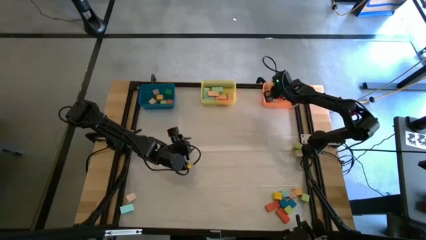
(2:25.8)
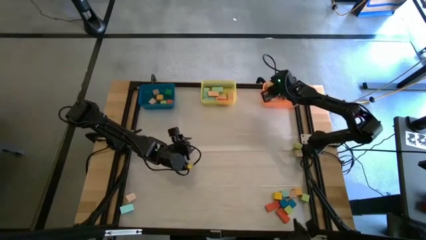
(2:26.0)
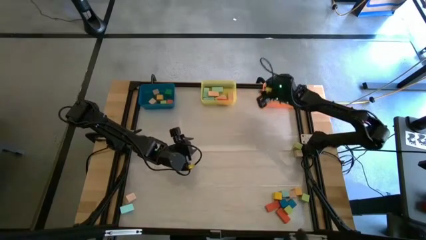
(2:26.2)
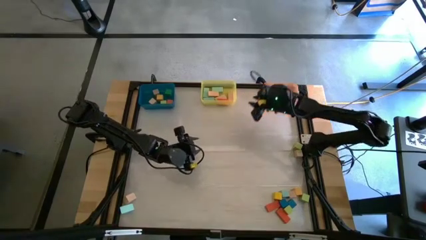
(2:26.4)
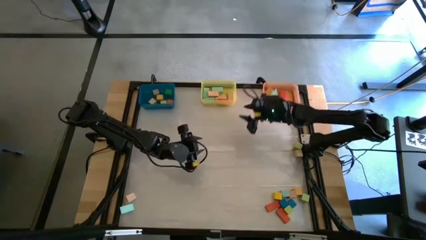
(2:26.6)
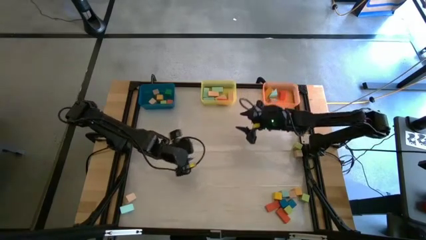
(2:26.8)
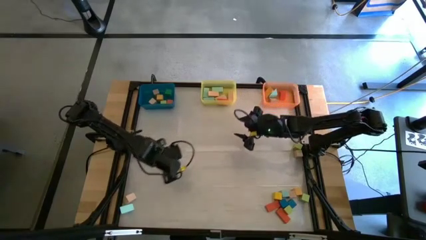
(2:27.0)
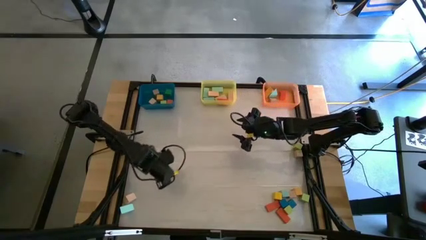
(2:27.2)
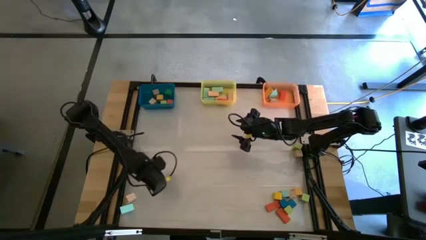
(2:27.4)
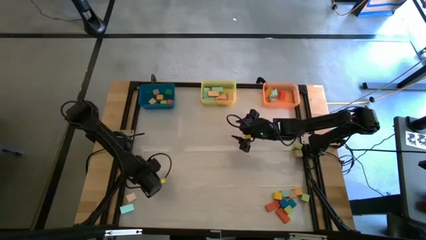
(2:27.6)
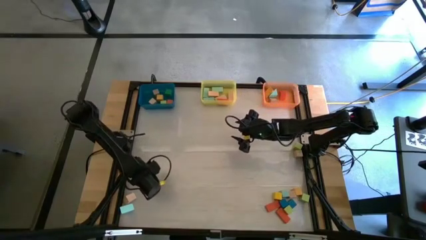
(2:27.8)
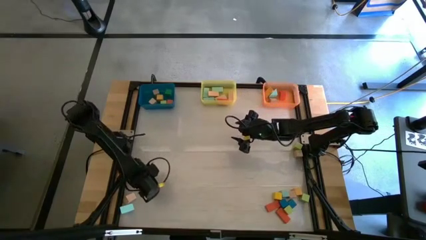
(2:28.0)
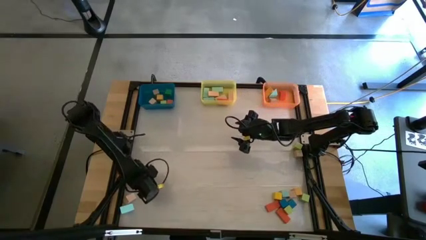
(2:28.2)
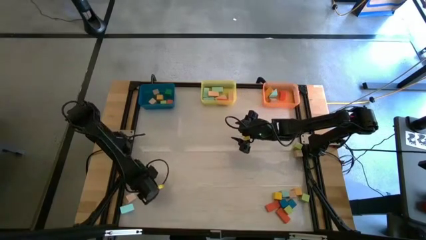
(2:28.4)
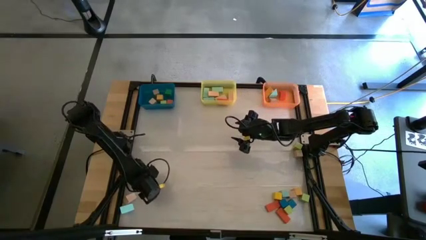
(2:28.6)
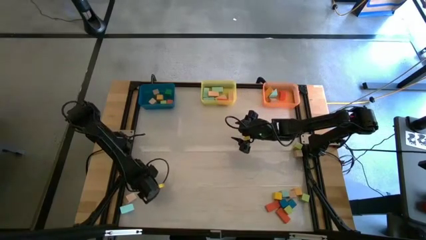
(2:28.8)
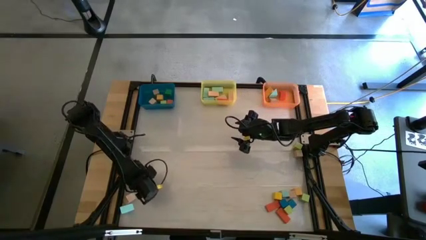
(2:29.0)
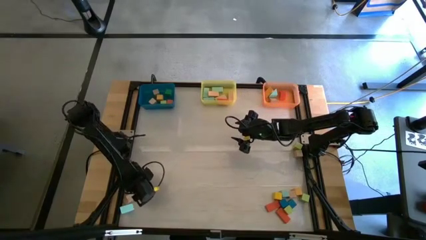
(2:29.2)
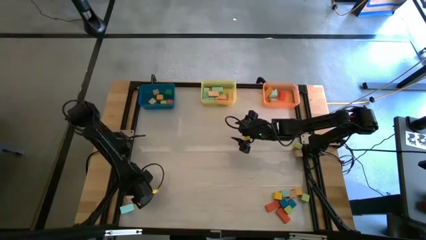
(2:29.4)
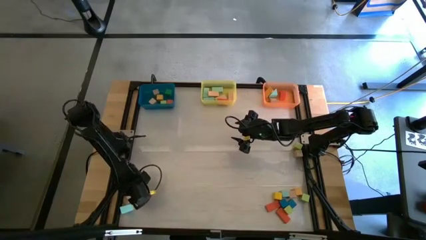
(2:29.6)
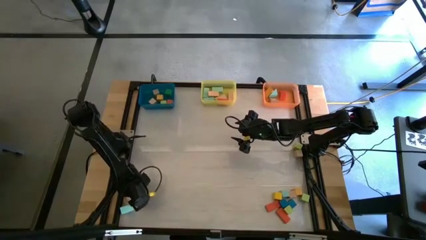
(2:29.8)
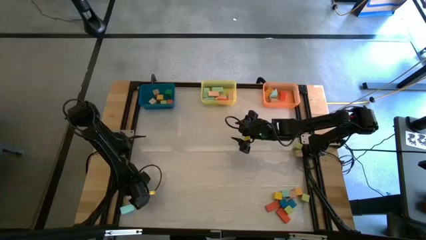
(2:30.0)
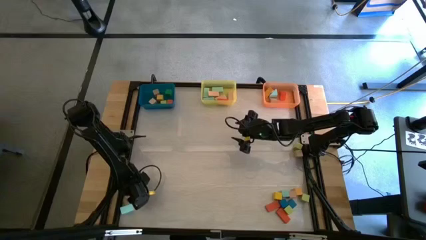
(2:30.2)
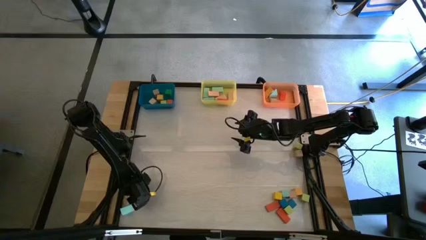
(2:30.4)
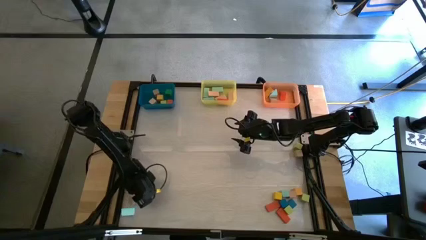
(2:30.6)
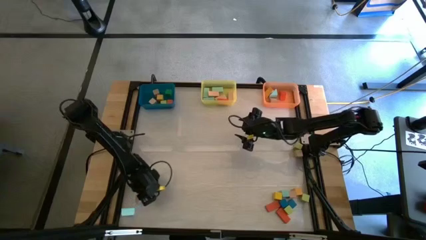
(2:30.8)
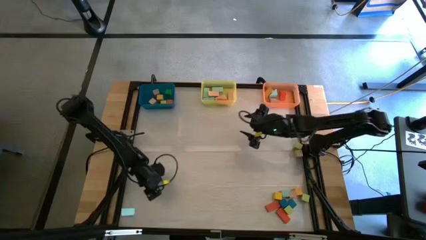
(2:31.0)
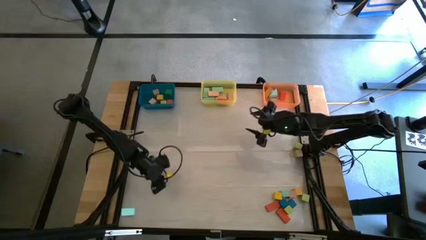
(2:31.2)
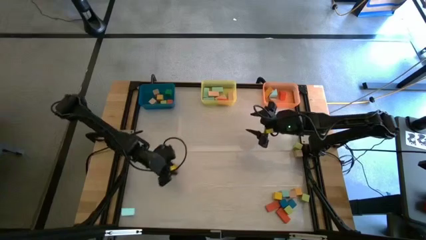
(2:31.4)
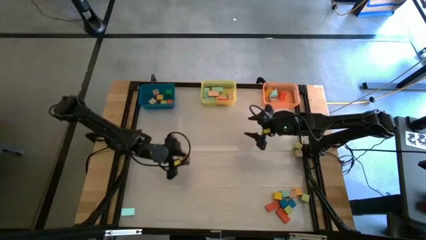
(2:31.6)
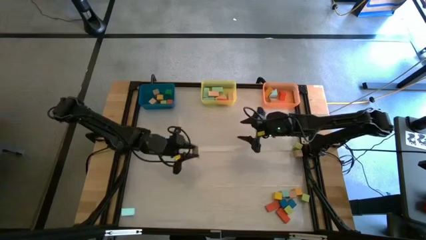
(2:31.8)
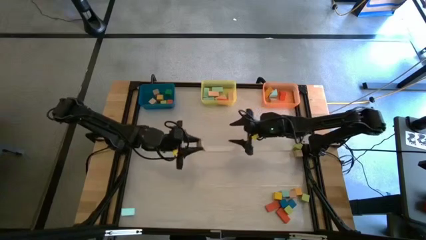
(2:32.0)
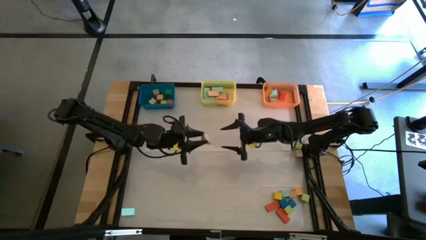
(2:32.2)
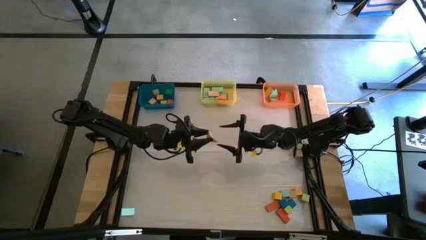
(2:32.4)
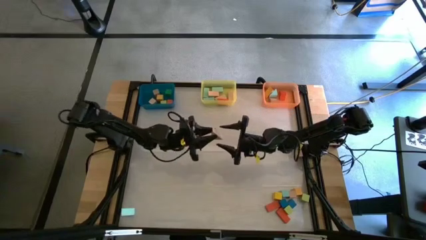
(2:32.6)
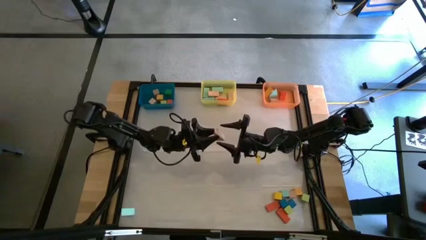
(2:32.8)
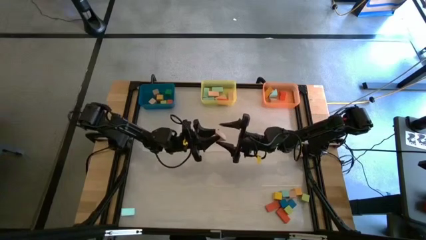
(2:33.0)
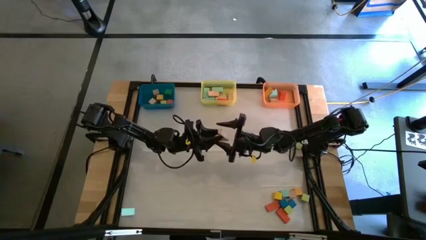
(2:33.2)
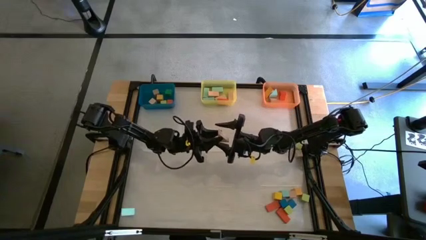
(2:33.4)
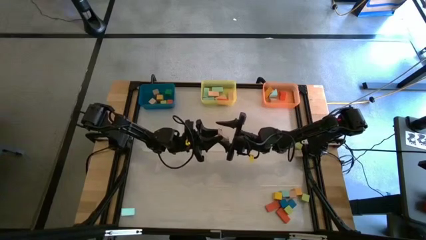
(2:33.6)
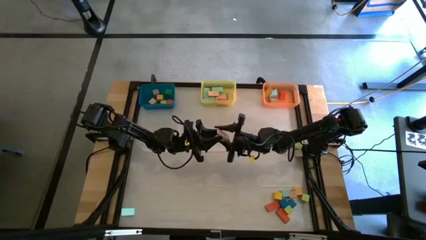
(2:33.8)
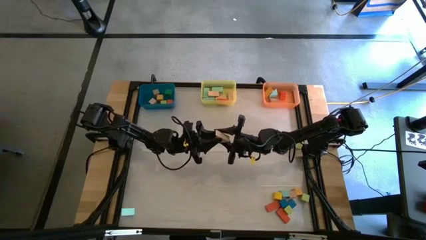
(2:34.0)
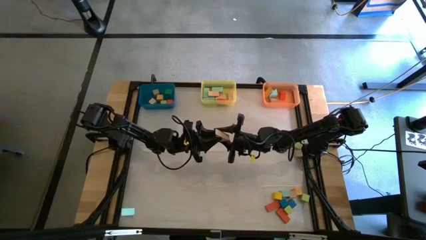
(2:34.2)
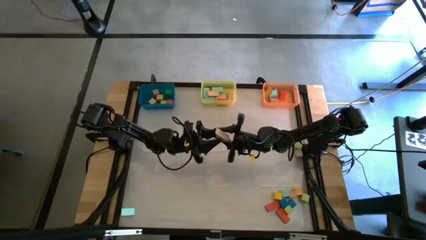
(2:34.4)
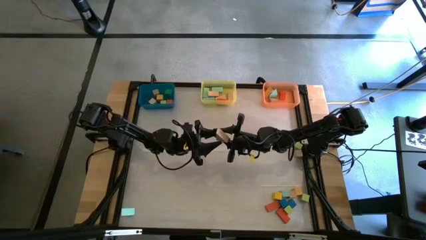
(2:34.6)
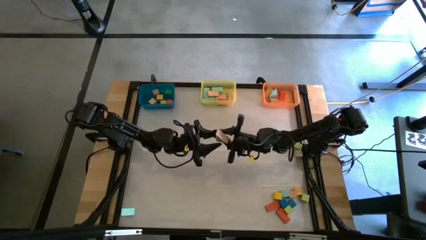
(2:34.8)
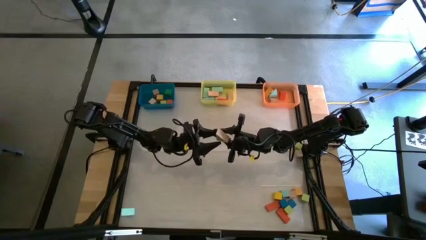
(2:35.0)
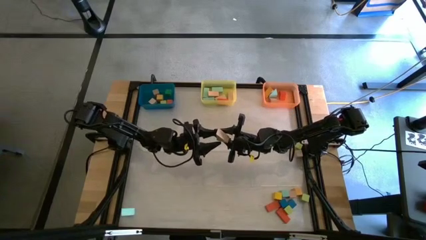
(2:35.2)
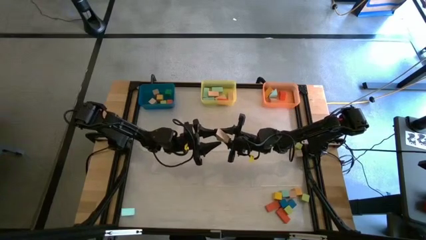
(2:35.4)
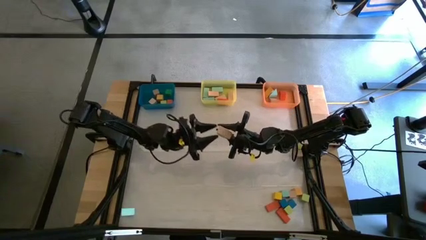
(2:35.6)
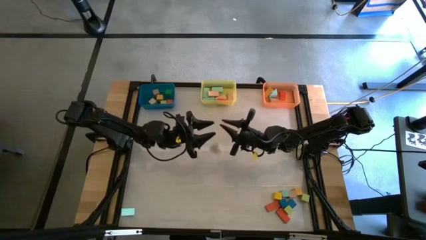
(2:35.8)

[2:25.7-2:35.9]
Task: Sort blocks by size
Put the brown triangle block into the orange bin

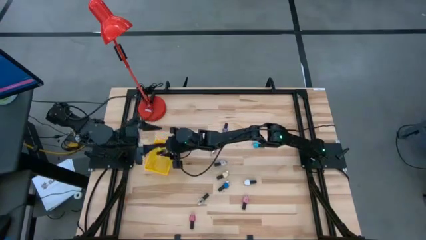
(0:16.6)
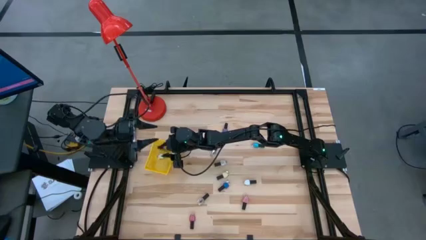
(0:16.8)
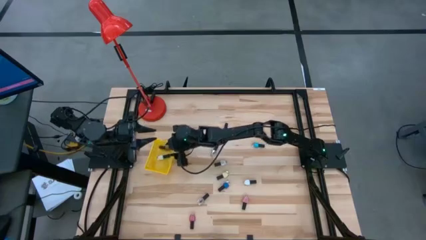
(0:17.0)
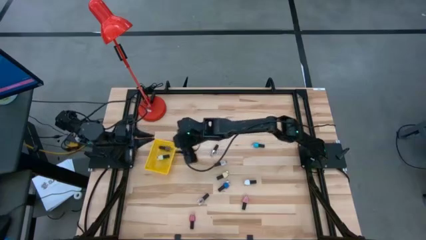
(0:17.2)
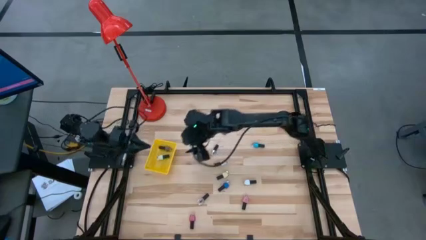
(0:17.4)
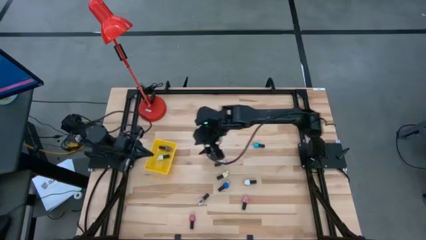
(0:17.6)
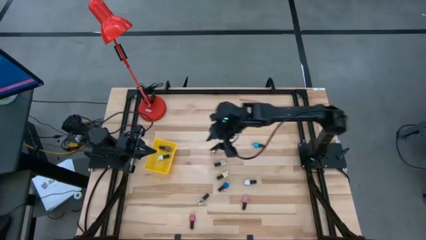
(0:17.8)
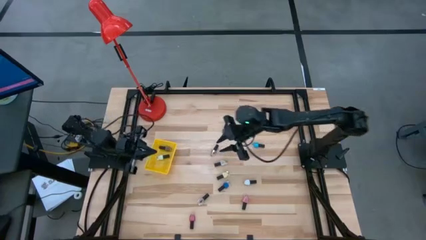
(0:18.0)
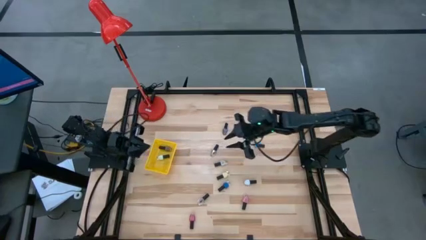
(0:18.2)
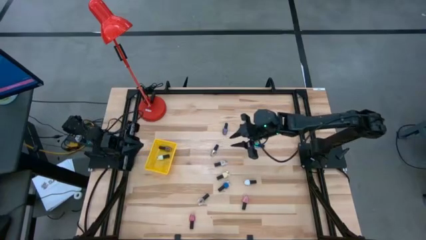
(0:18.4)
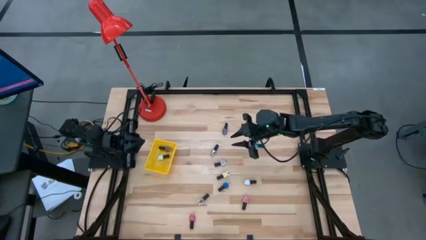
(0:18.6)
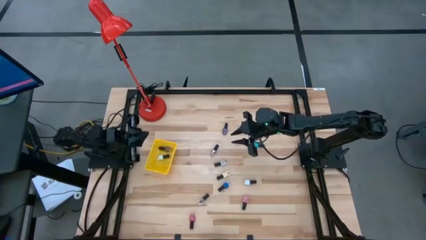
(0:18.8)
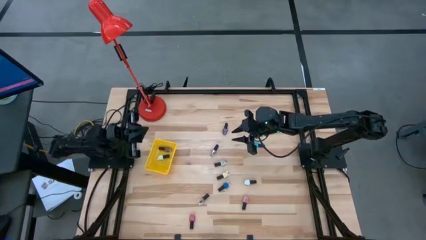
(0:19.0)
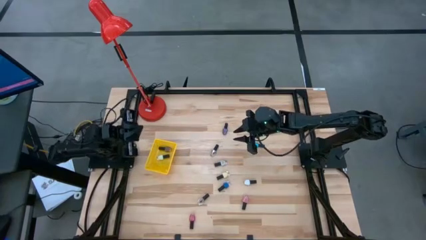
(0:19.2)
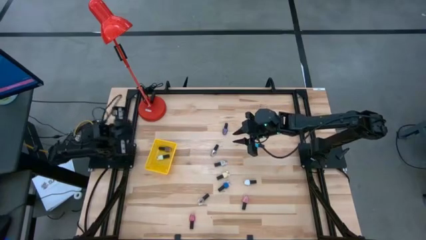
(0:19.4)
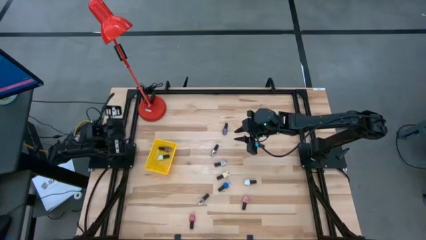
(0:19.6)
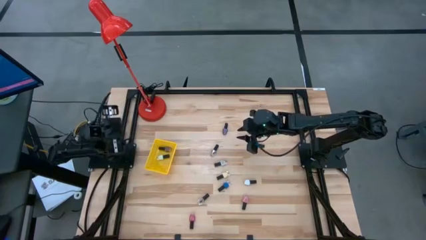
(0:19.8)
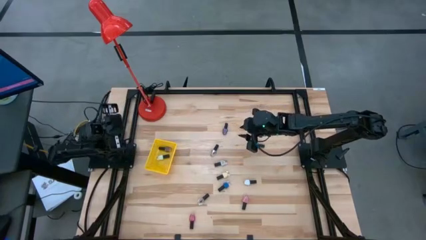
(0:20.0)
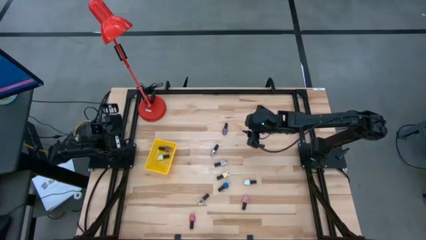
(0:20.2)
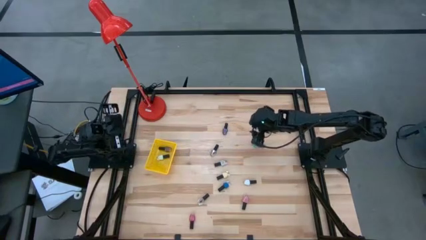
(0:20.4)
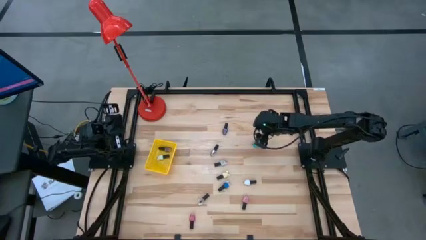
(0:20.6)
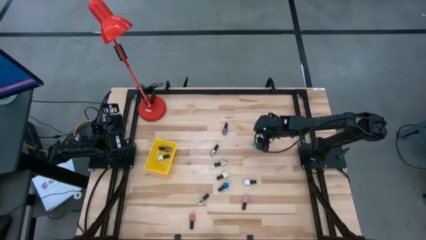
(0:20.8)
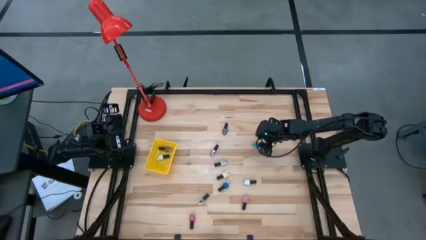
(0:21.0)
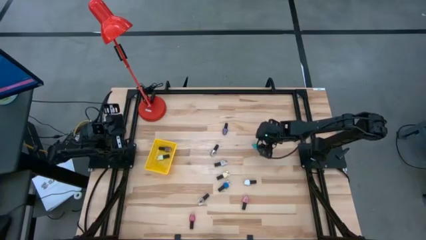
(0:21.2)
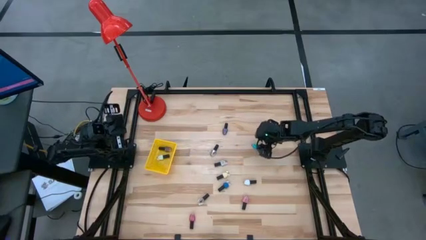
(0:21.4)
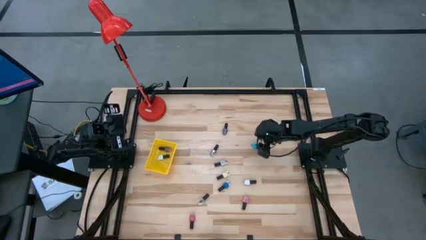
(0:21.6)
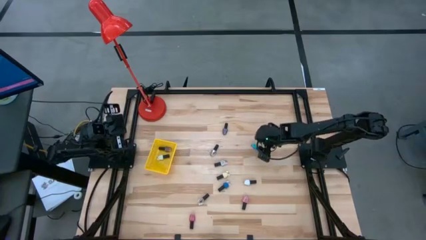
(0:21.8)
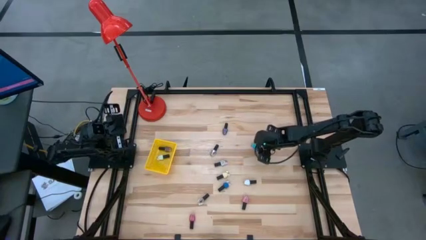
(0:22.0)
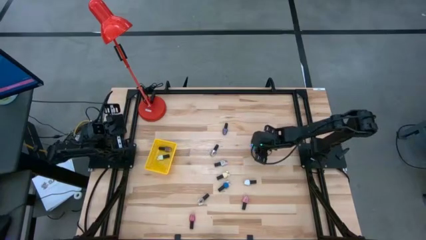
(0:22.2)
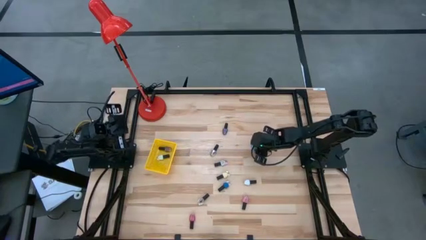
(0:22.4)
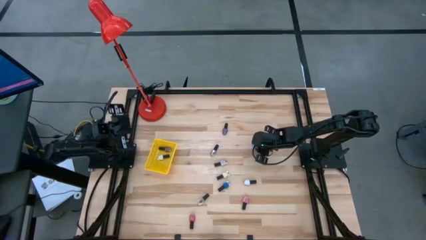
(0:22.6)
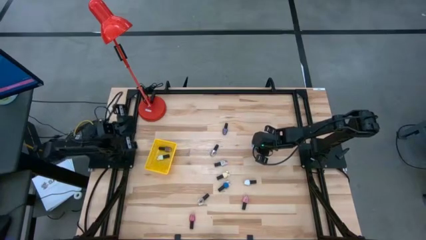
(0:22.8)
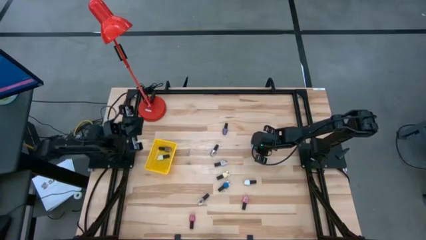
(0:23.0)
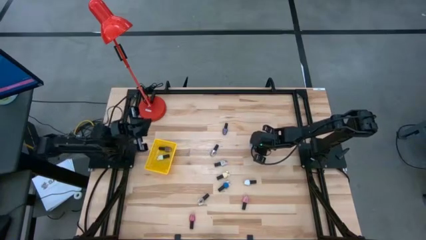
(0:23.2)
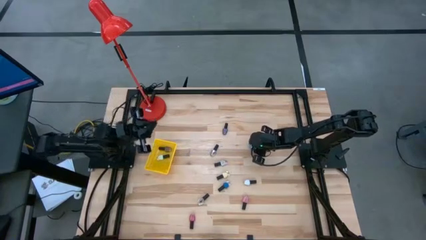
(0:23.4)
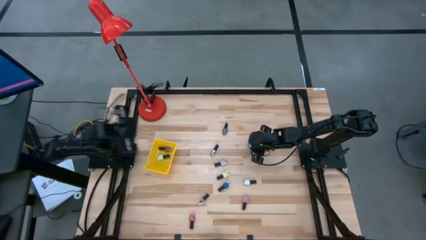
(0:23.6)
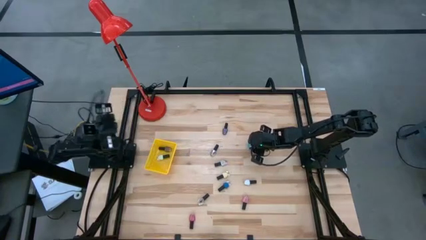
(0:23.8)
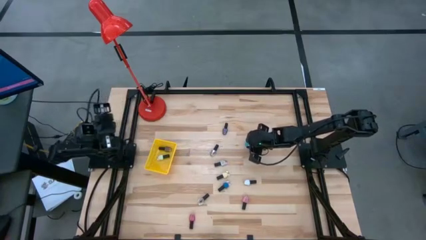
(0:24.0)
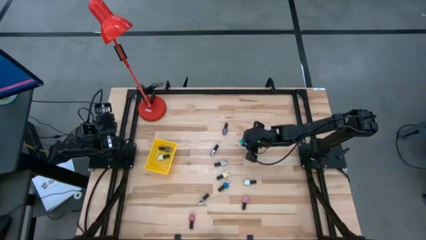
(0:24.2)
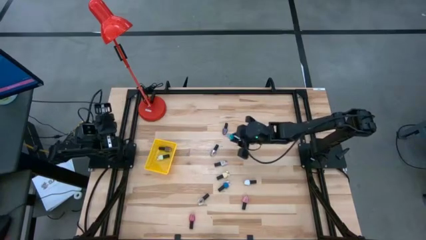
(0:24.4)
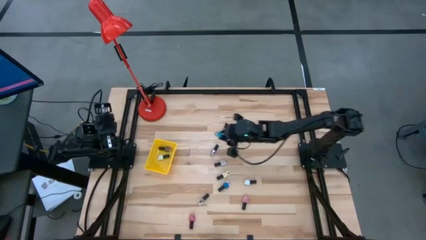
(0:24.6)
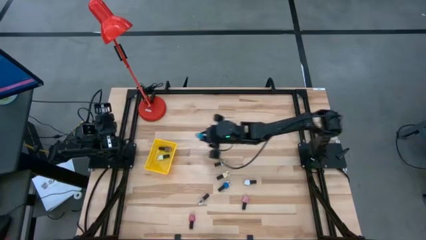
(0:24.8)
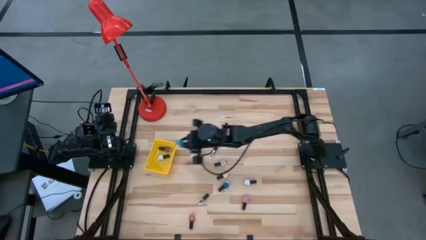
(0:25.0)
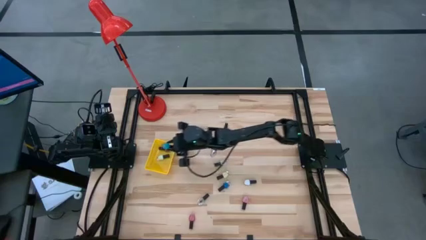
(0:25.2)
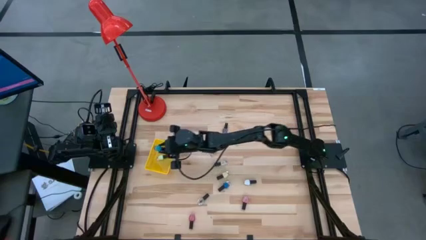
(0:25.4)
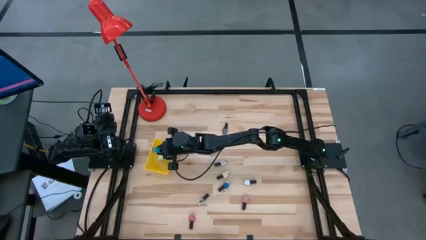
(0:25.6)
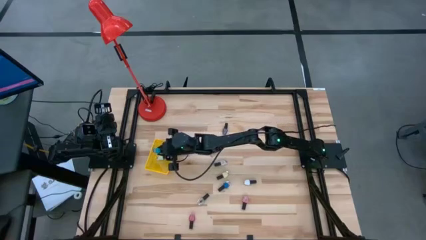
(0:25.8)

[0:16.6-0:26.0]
Task: Pick & Place Nail Polish
Put the light blue nail polish bottle into the yellow basket
